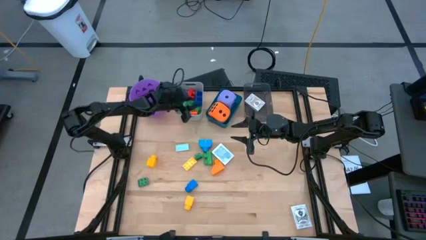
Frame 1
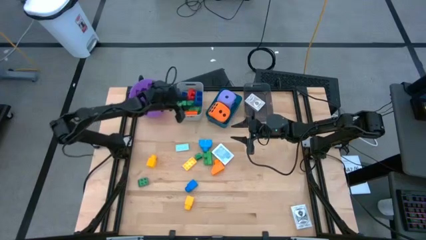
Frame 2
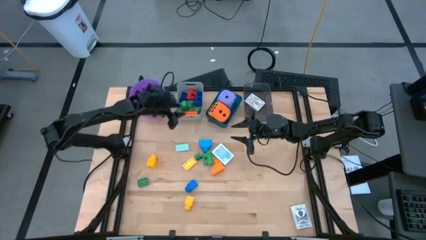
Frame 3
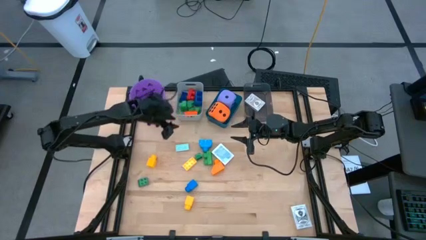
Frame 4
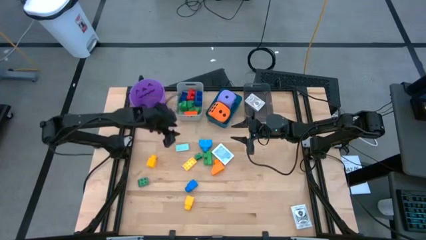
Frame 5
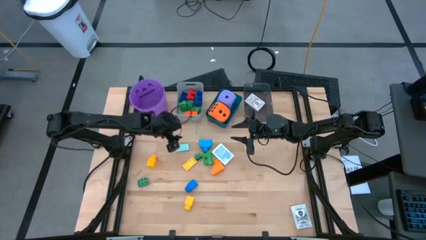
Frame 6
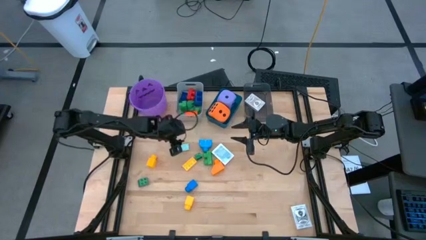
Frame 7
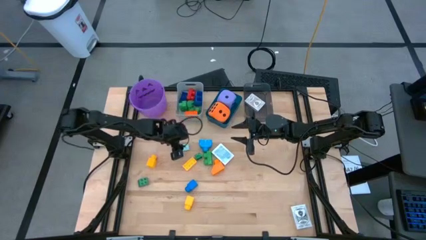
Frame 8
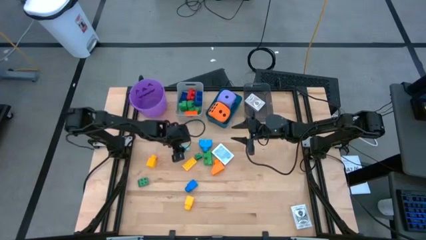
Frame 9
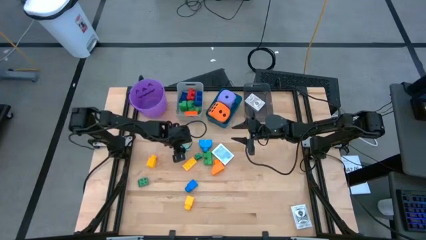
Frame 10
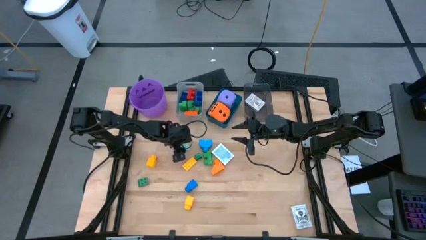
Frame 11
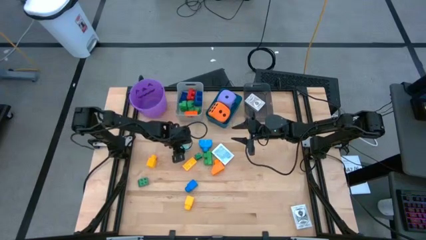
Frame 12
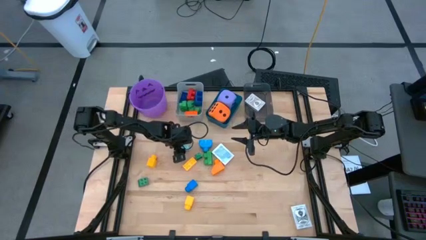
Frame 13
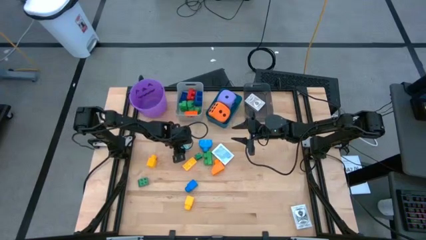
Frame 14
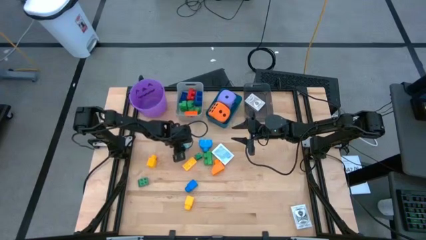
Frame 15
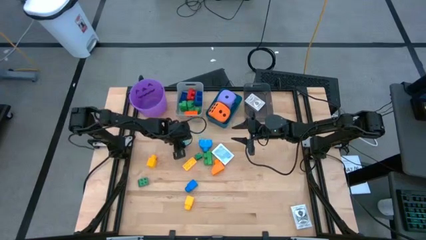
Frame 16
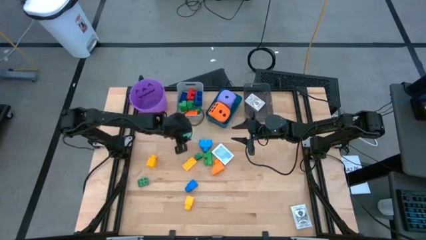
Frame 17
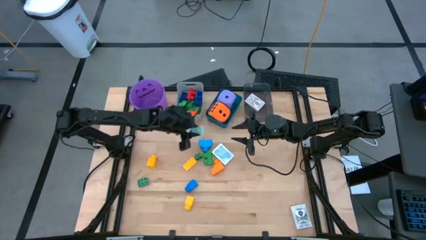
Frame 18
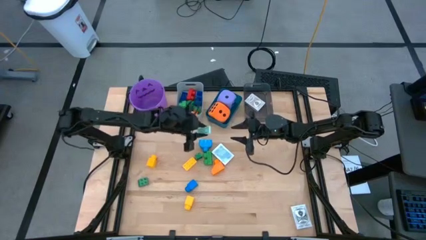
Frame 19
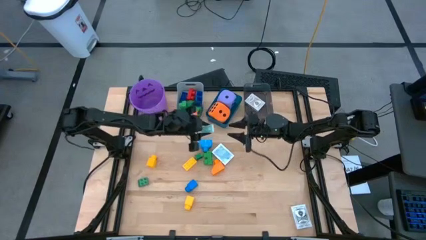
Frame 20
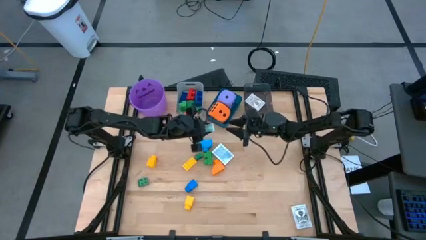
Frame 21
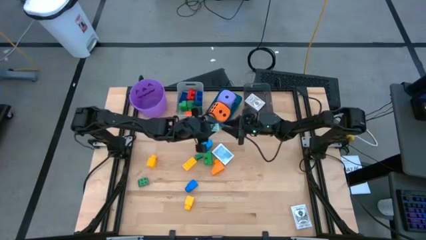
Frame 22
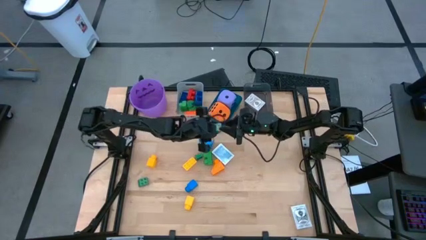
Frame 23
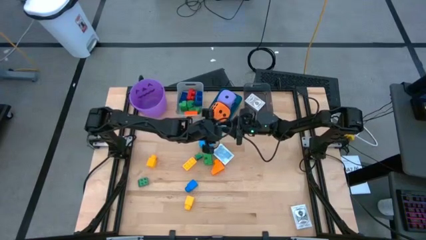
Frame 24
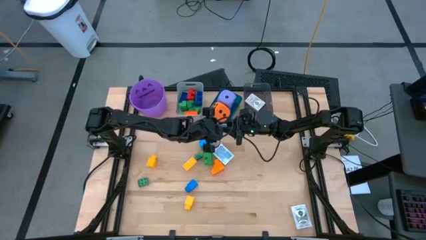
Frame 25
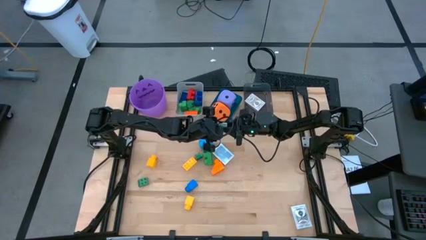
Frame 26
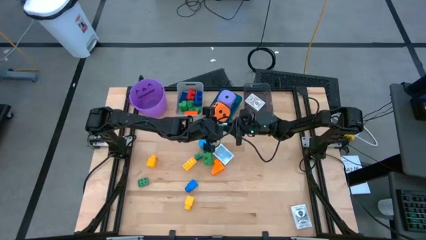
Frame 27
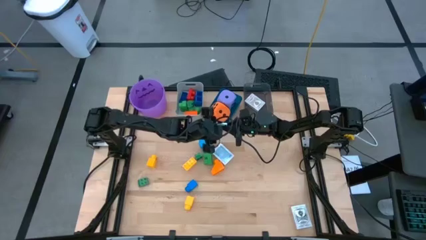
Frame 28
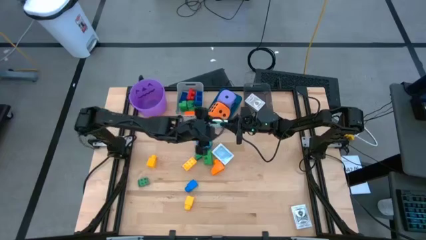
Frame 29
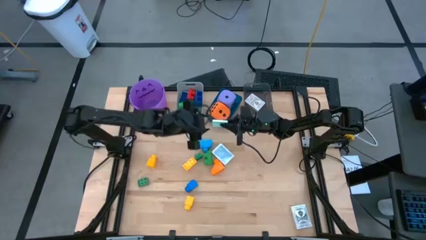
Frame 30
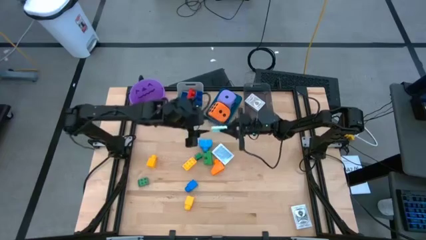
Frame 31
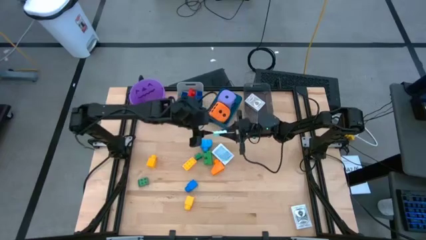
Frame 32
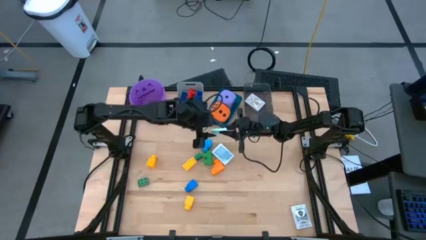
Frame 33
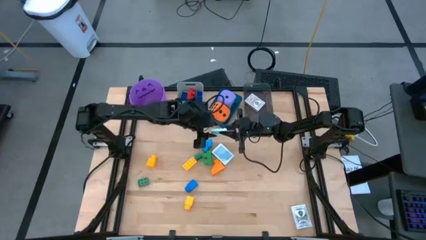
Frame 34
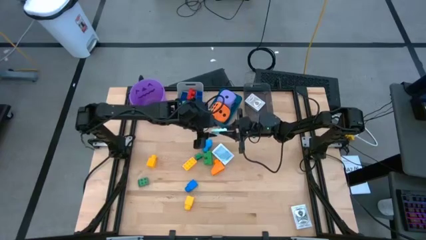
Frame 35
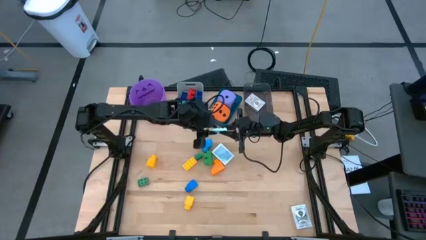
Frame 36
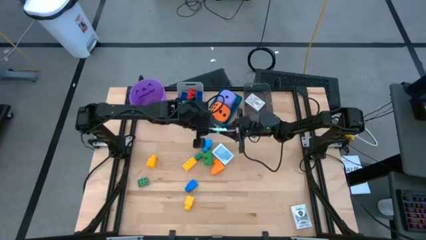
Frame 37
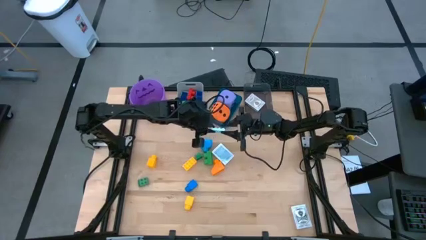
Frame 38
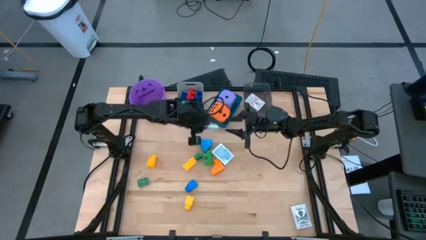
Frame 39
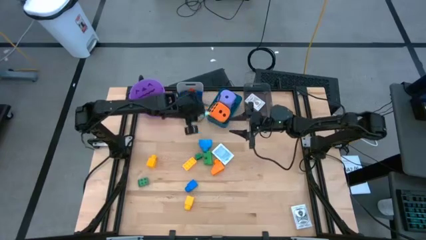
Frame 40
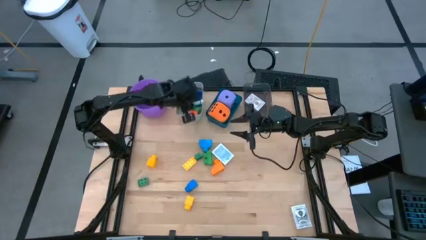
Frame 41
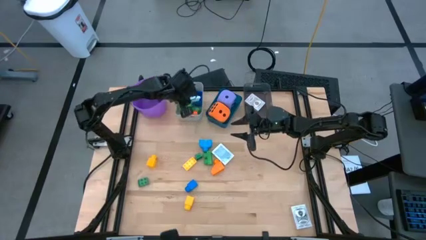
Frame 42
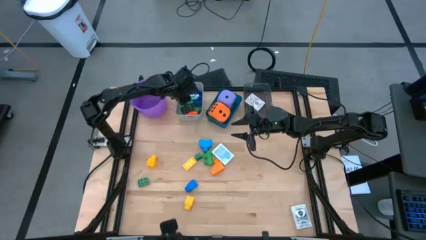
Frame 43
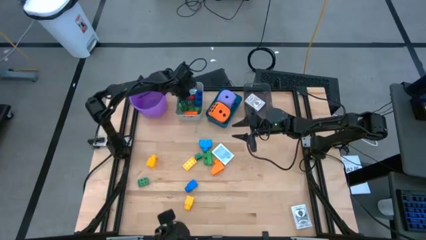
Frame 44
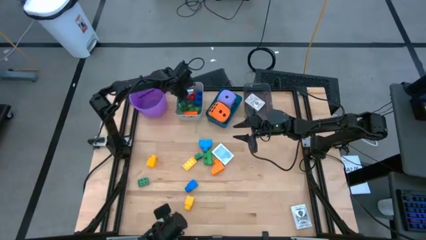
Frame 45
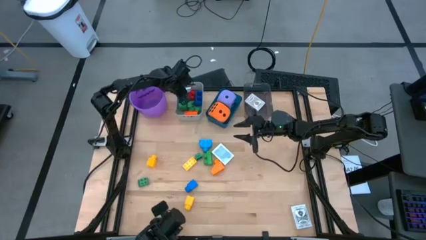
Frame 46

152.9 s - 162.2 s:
Task: Pick & Place Toys
Put the light blue game piece into the gray bin

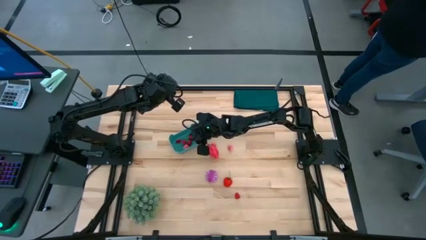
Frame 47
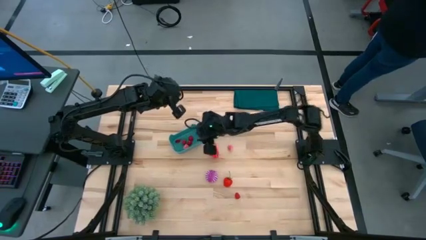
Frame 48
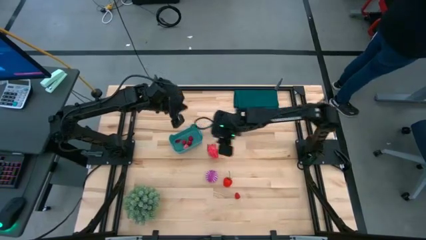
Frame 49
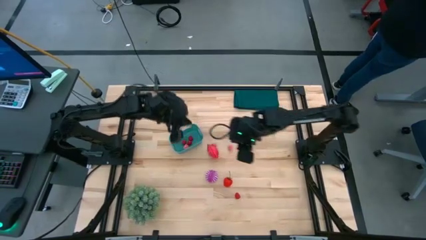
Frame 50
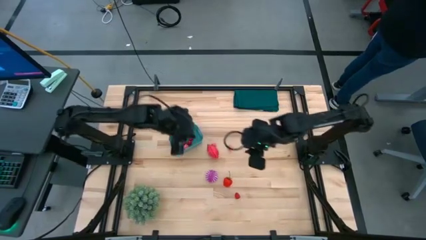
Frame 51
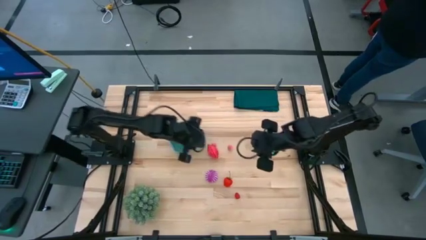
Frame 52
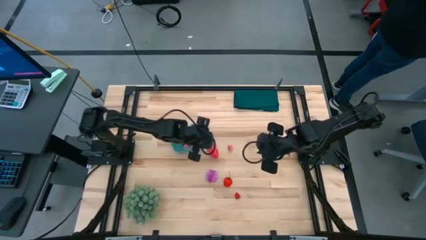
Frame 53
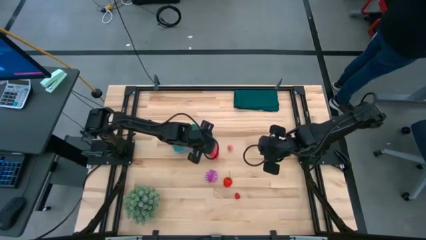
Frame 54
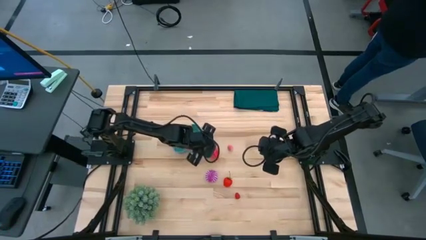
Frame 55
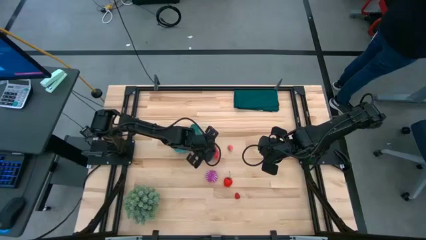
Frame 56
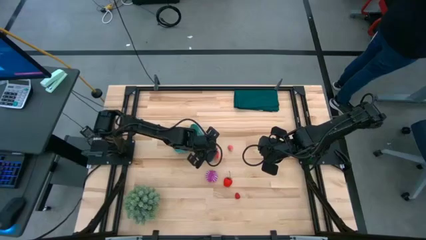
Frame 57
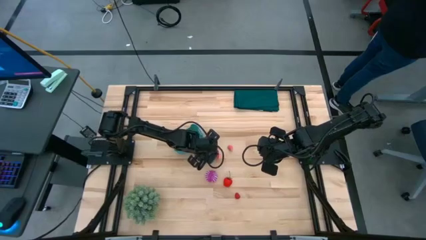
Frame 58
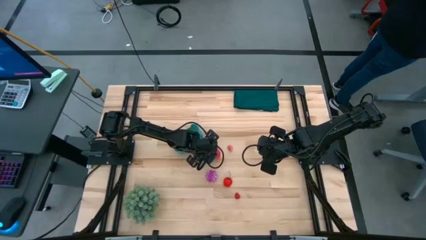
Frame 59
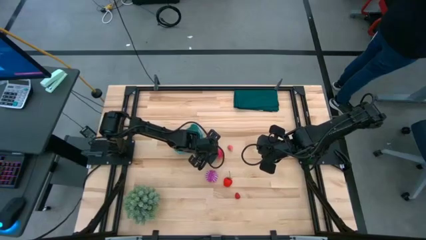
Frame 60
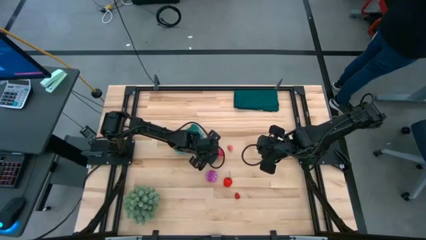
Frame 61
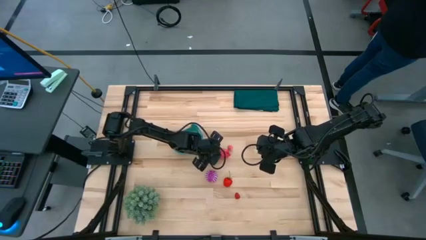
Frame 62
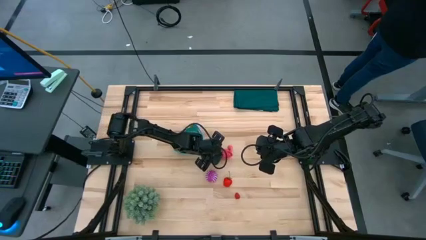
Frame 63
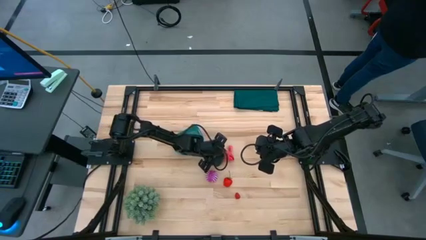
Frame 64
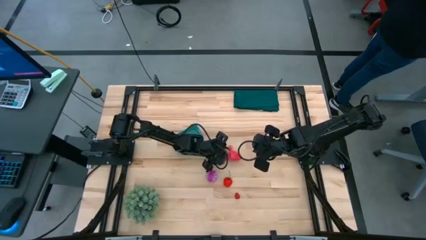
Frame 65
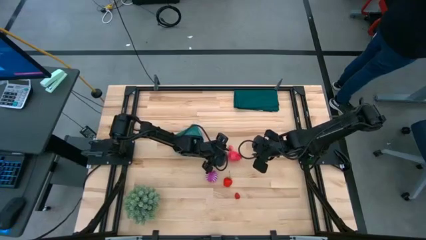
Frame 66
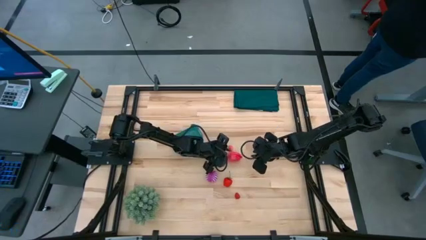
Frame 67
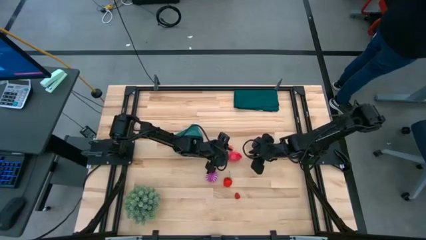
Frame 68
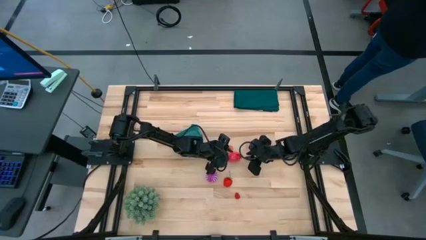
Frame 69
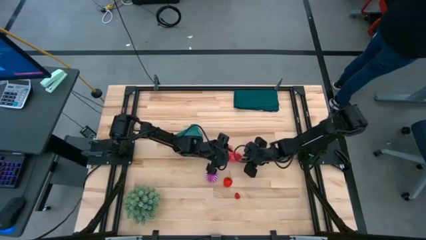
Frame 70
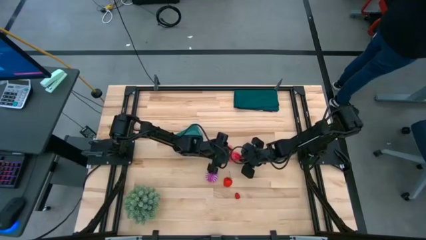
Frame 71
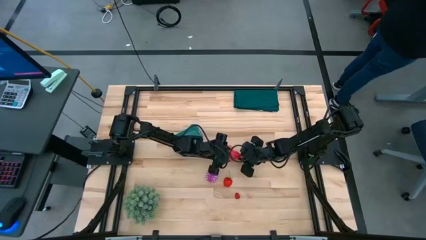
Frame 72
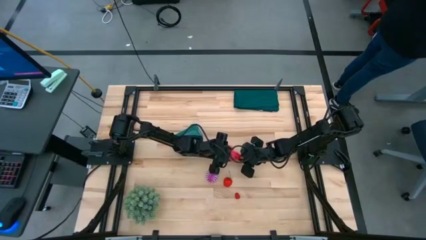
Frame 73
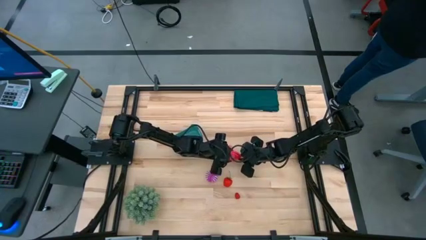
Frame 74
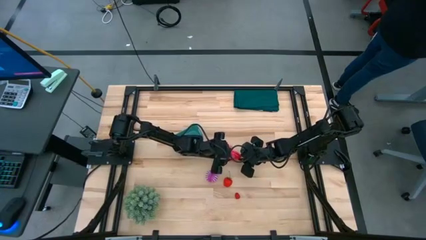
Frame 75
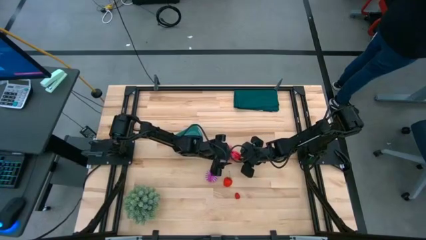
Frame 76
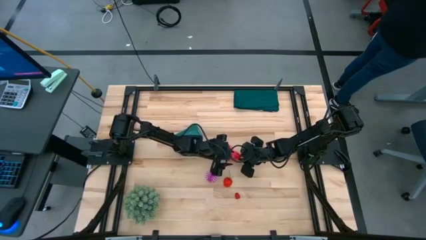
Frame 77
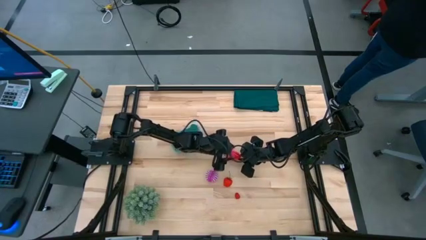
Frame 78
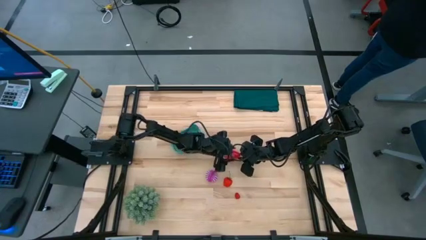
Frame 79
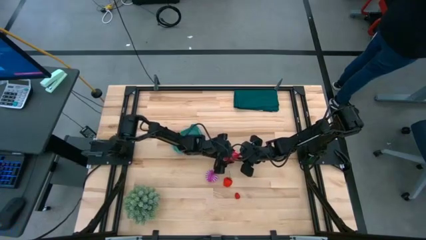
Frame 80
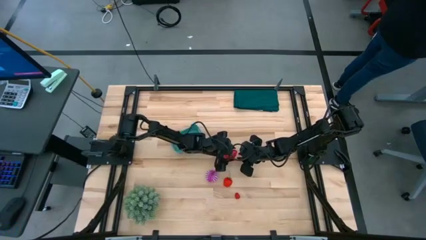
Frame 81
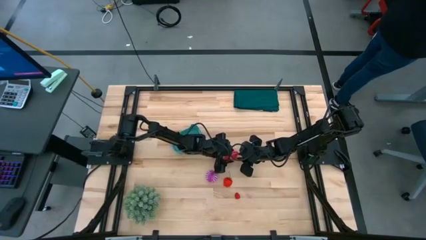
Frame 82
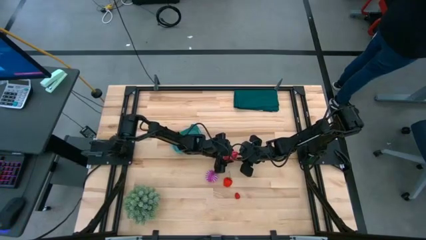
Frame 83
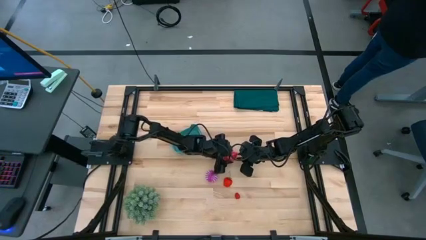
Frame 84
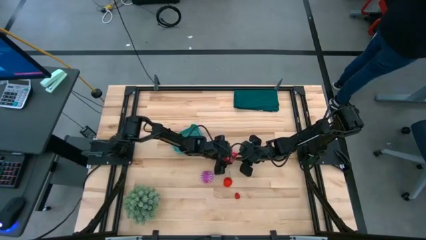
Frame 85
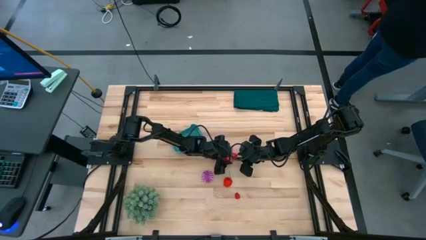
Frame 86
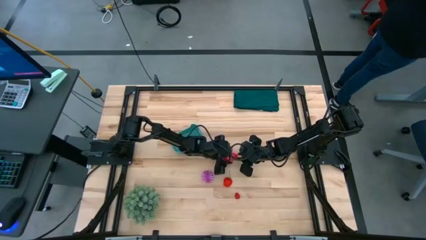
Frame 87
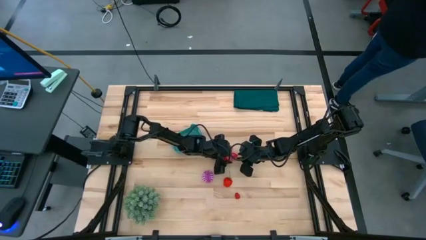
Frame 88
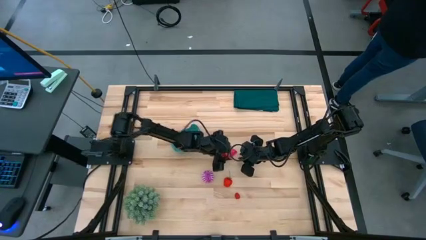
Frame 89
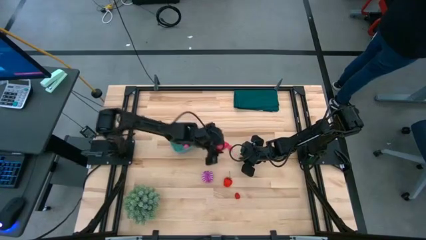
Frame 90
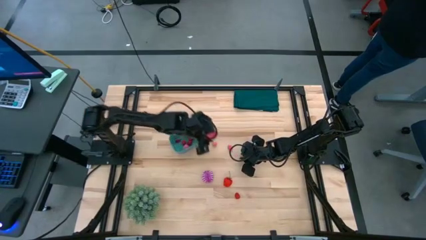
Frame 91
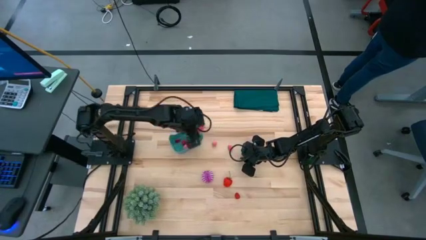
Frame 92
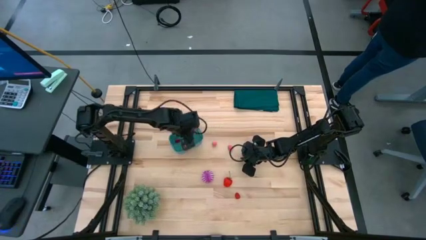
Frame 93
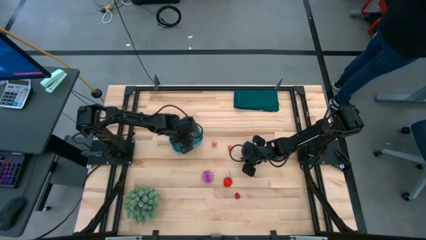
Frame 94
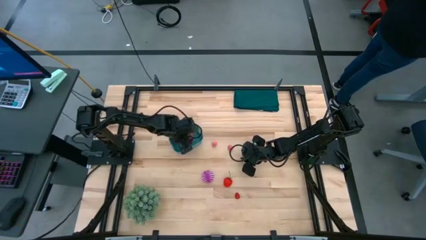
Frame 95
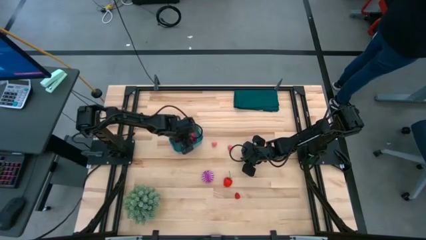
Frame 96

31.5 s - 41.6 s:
Task: Pick and placing Produce into tupperware
Put the red dragon fruit into the blue bin
